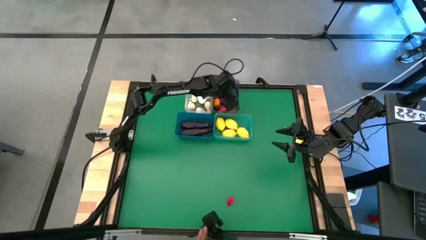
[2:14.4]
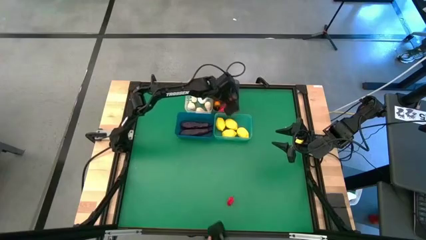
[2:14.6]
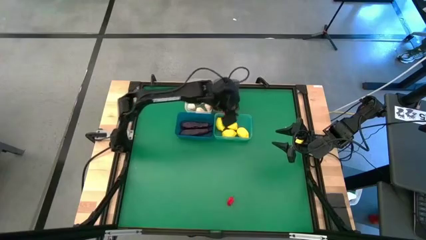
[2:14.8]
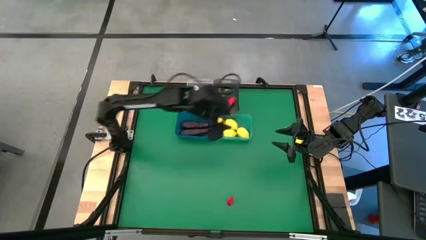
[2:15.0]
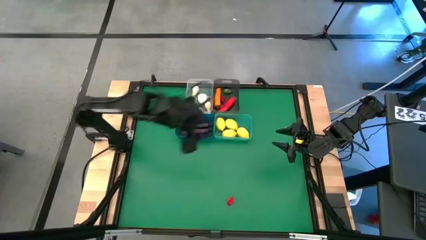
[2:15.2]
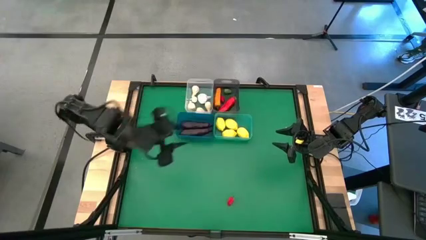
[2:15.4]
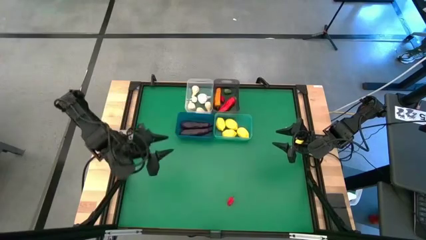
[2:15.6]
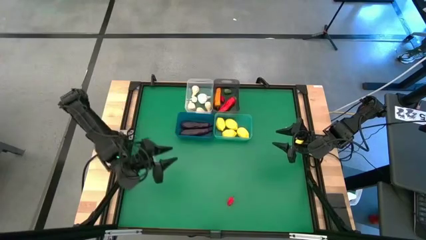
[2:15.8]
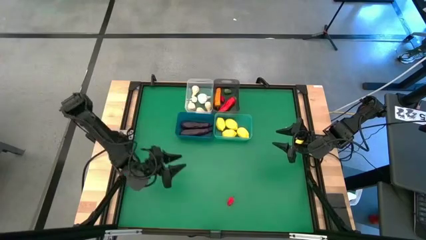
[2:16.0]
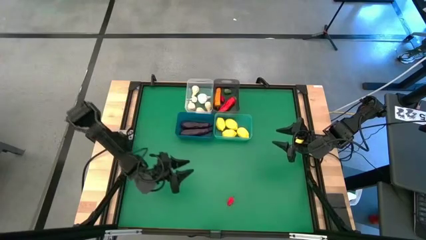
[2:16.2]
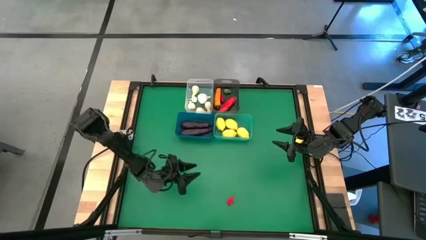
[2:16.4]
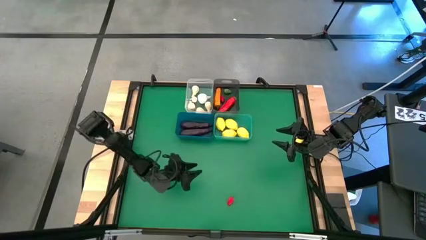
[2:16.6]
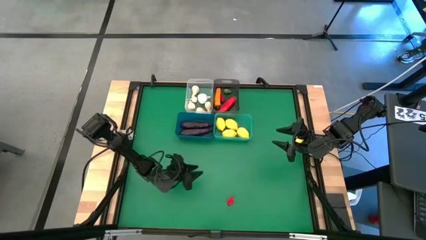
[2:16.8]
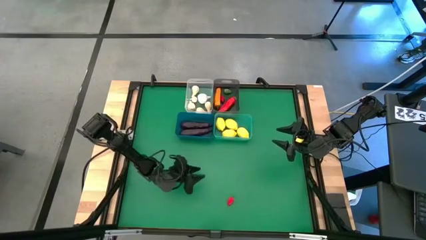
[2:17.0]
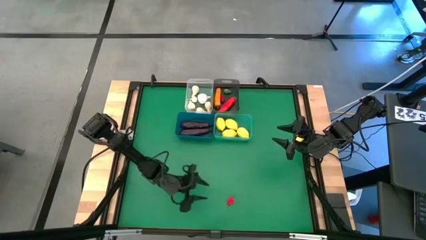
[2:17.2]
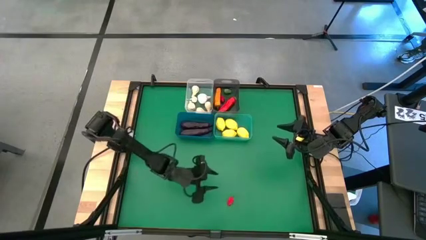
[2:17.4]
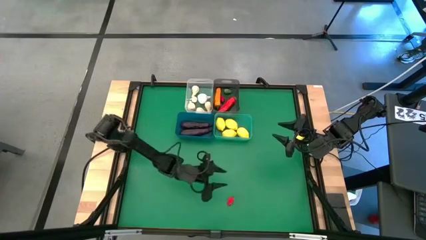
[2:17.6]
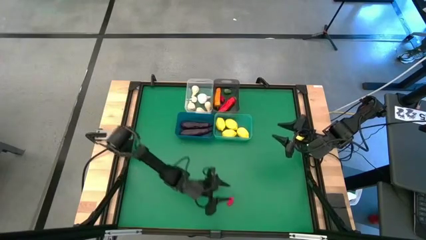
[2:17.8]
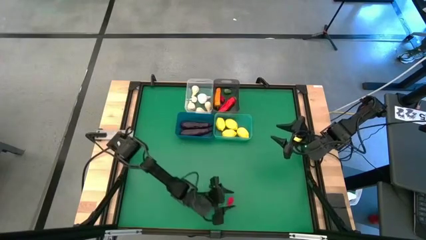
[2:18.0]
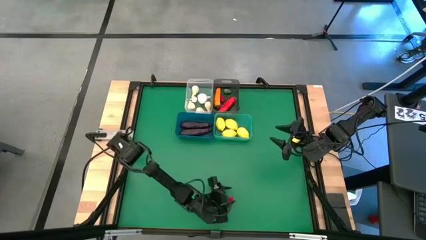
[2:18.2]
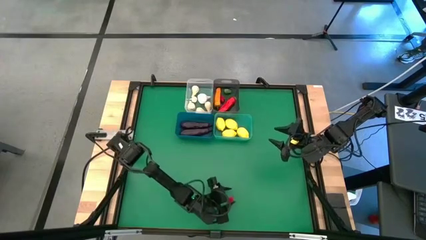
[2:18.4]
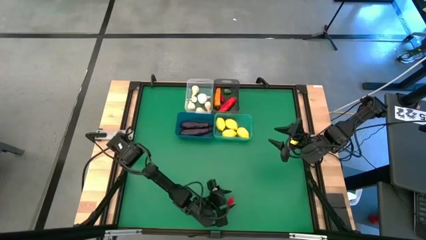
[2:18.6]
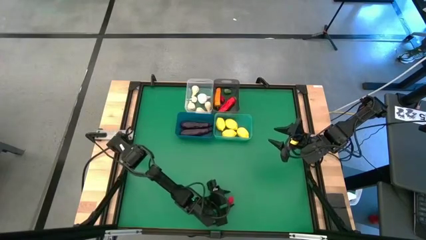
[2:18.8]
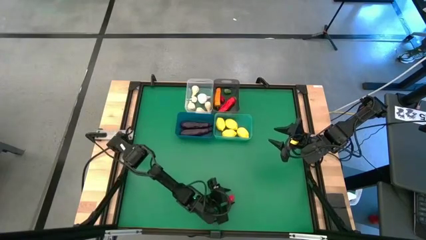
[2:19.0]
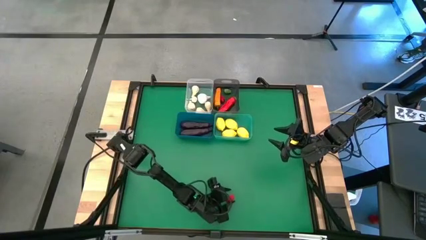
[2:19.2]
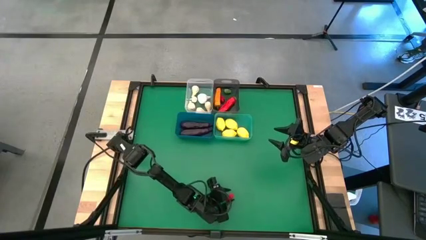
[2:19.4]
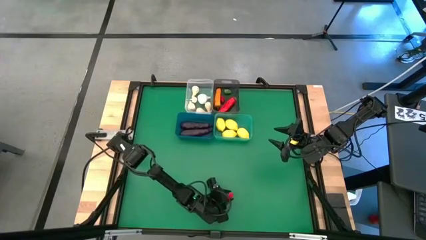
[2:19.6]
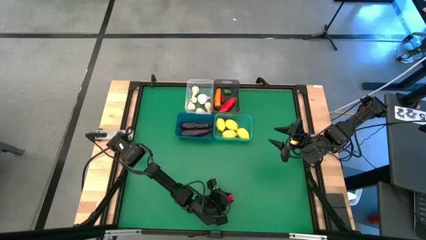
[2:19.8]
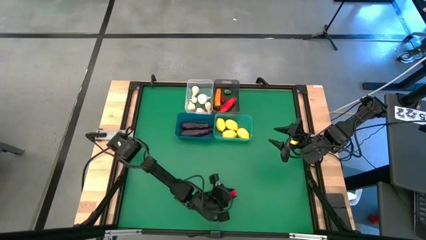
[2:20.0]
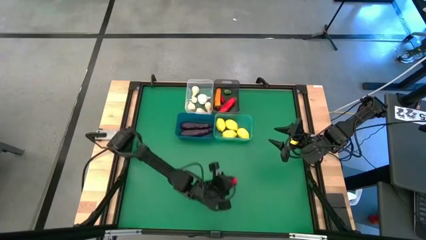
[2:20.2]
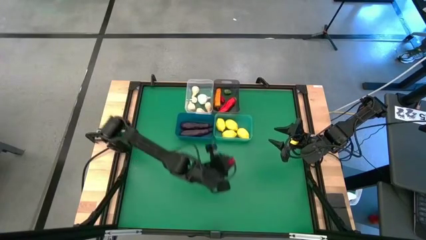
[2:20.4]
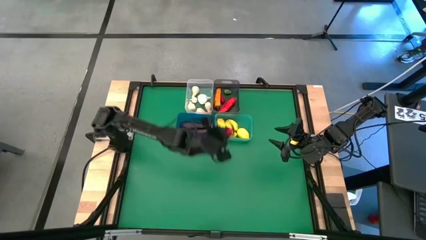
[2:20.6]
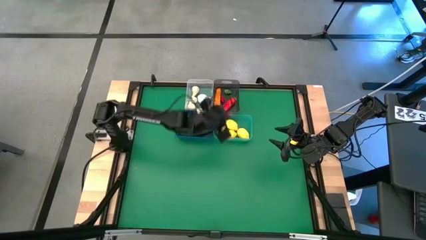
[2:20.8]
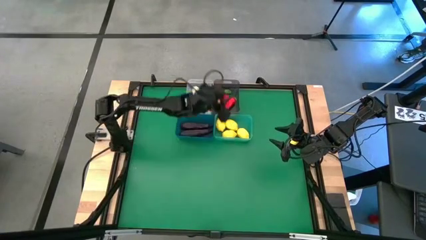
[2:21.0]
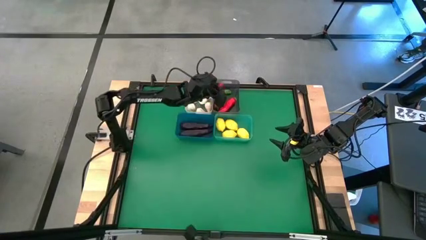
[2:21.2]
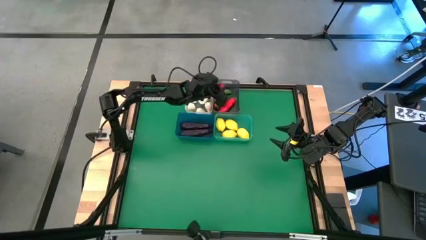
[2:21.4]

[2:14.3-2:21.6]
Task: Sort produce into baskets
Put the red chili pepper into the black bin

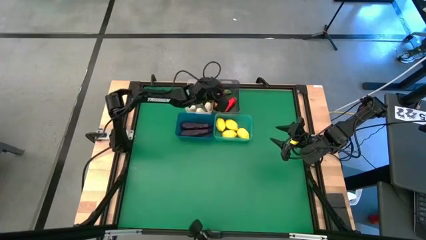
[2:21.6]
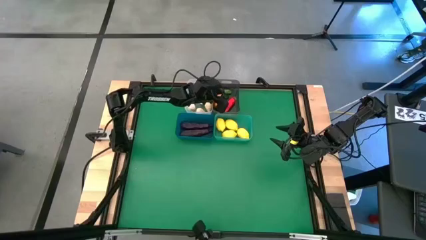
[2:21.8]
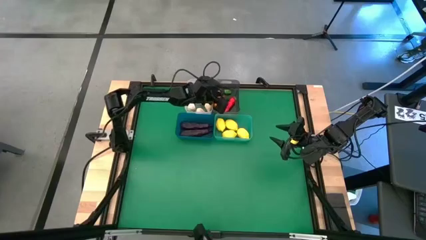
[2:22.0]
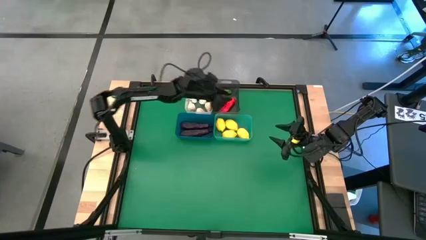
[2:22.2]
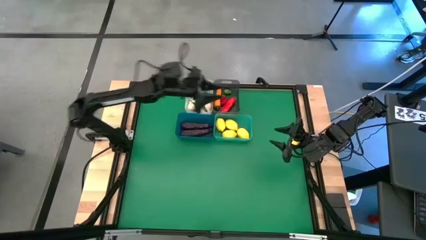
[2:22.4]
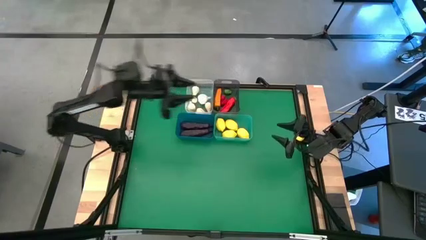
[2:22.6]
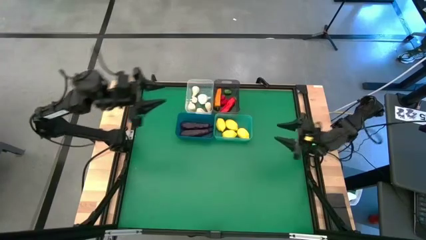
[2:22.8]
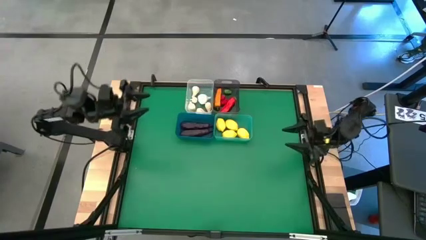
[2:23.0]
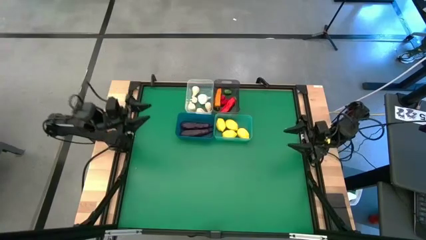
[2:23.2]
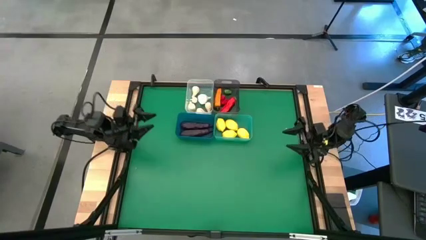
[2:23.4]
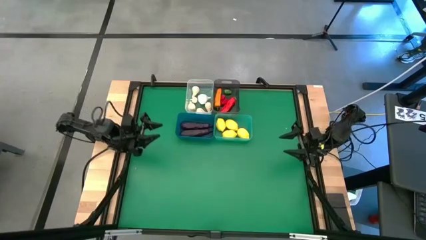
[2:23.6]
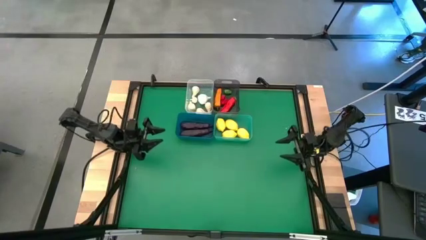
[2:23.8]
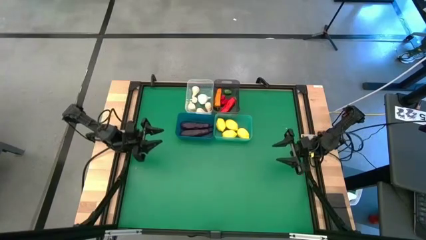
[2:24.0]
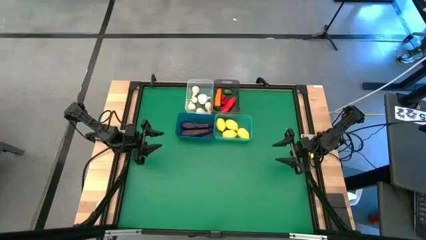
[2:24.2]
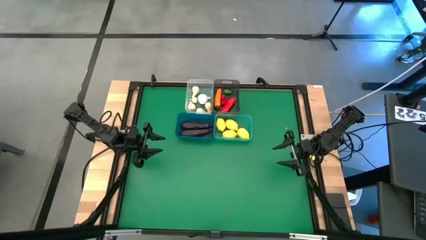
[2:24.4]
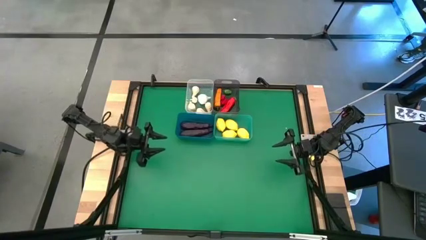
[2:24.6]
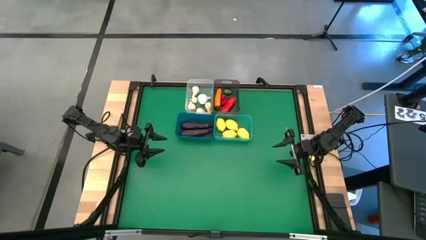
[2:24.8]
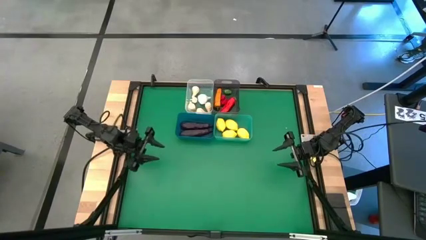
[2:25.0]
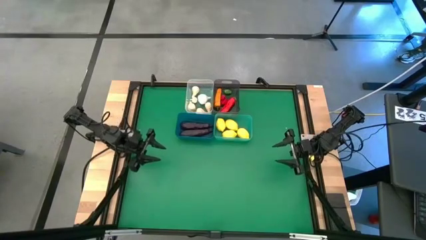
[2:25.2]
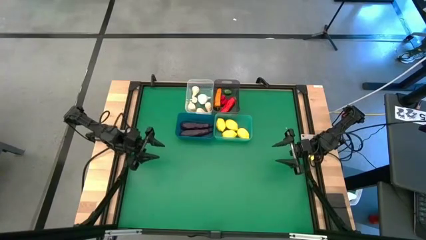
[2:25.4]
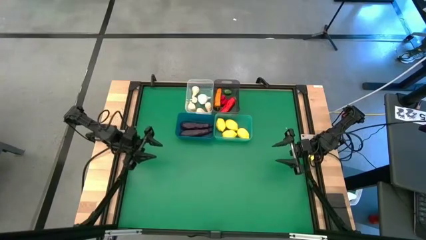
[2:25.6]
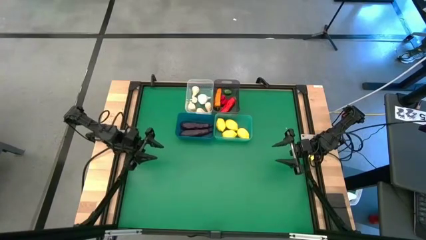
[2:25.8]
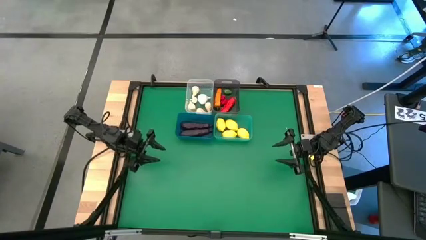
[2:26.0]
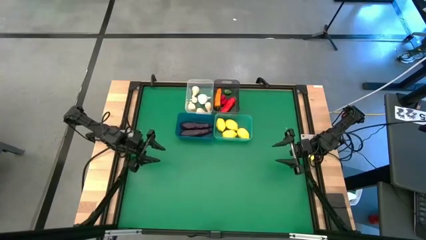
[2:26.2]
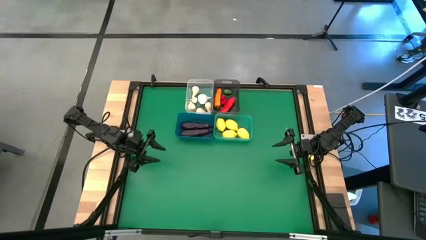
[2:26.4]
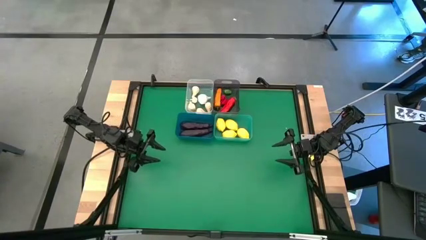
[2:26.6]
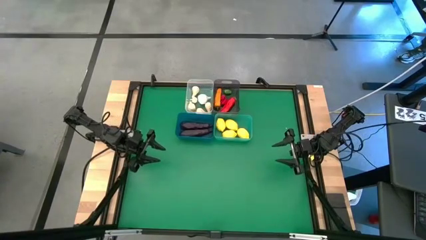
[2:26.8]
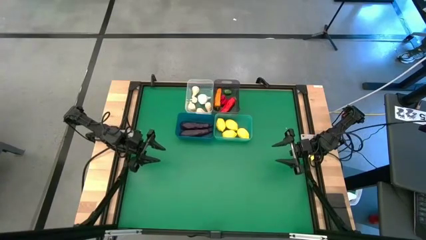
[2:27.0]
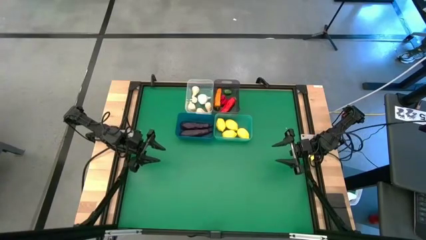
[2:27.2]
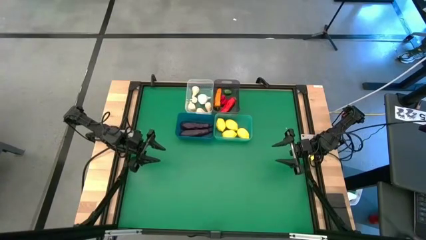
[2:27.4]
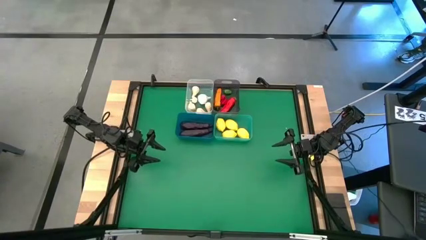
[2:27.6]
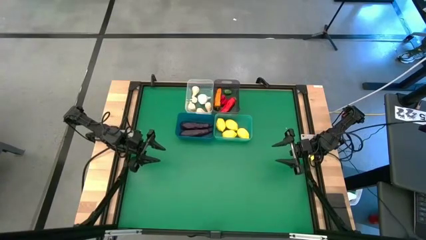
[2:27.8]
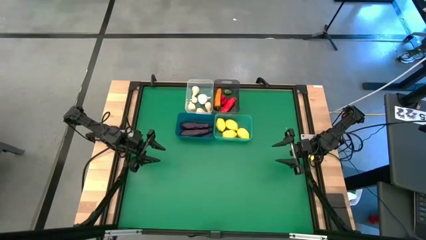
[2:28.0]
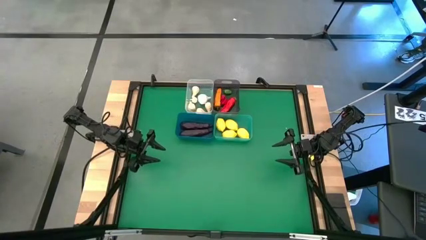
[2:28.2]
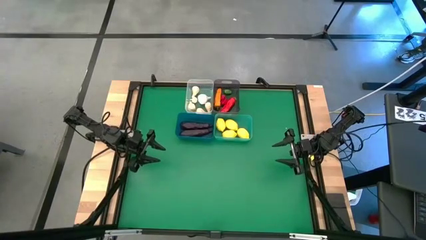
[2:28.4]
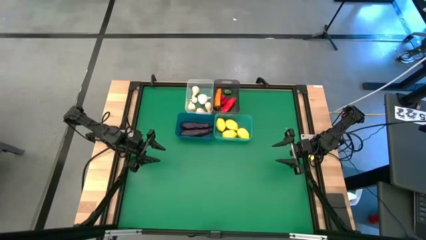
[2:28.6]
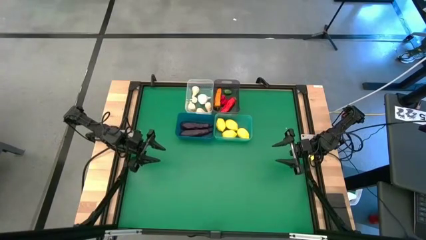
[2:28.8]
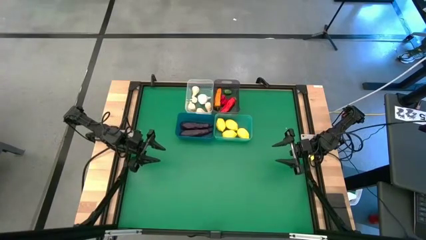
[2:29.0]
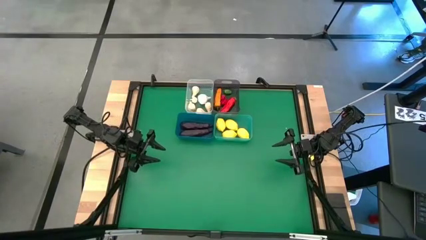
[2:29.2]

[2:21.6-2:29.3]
Return to Home Position

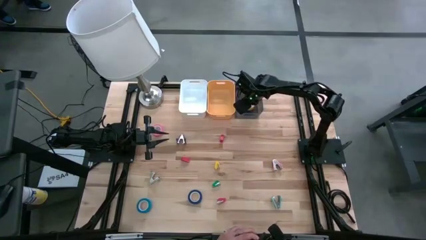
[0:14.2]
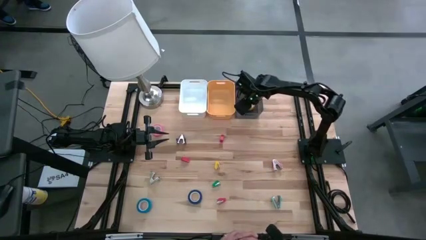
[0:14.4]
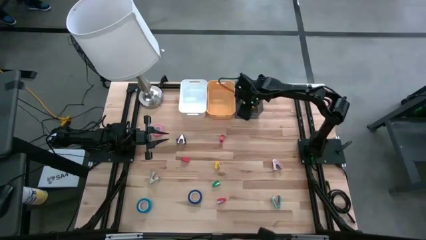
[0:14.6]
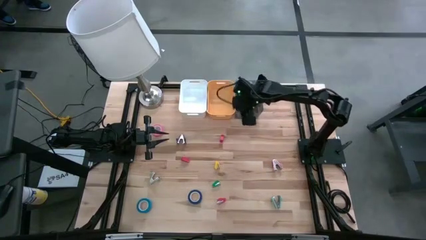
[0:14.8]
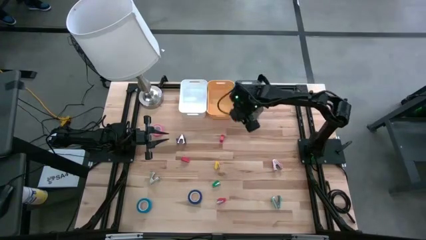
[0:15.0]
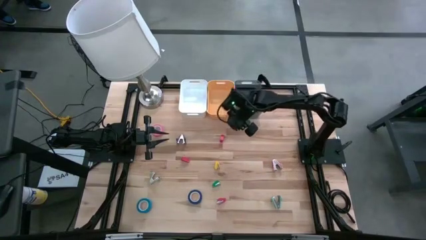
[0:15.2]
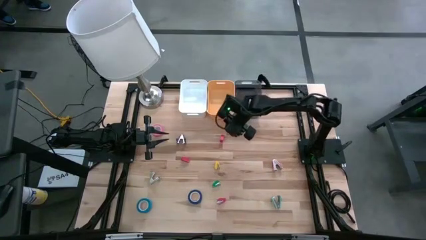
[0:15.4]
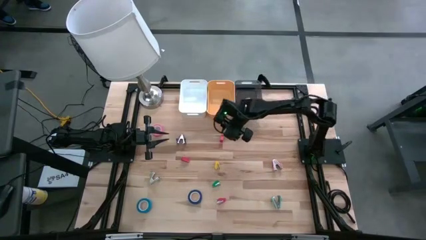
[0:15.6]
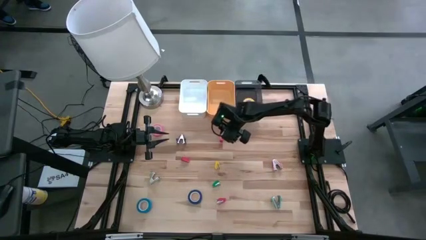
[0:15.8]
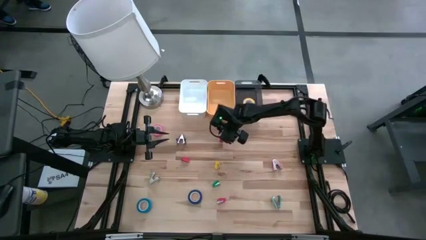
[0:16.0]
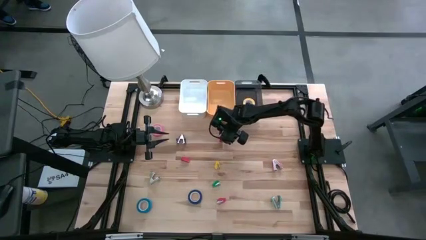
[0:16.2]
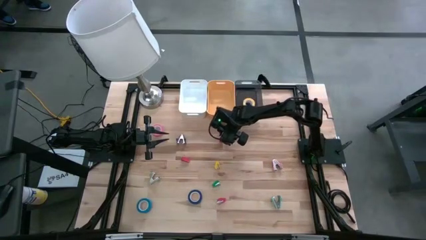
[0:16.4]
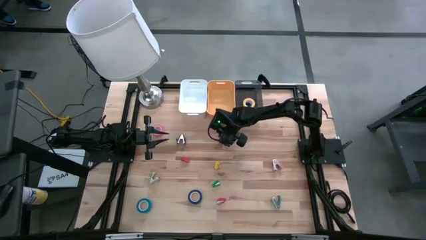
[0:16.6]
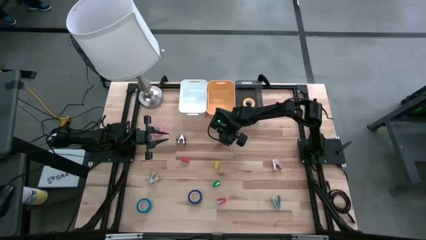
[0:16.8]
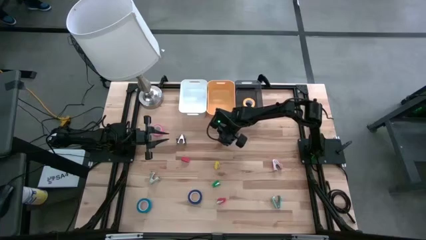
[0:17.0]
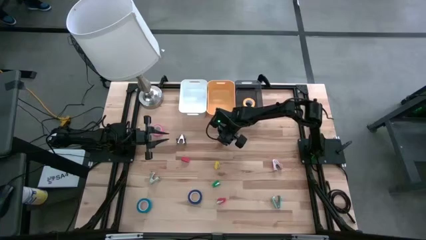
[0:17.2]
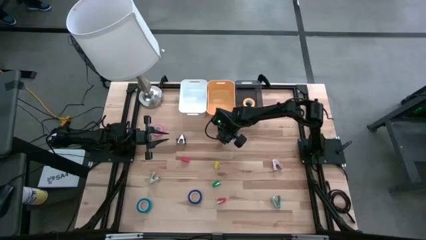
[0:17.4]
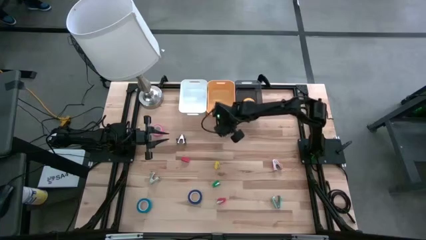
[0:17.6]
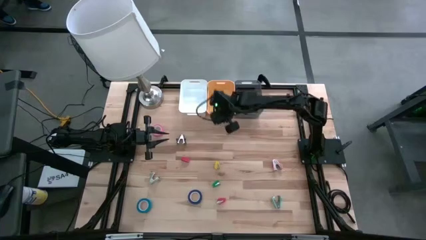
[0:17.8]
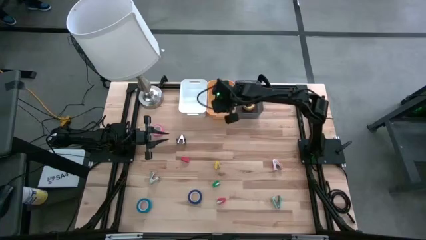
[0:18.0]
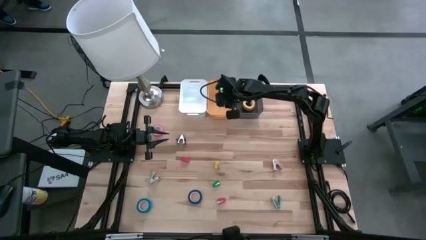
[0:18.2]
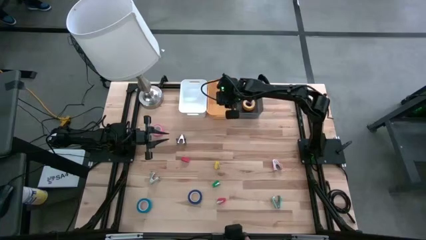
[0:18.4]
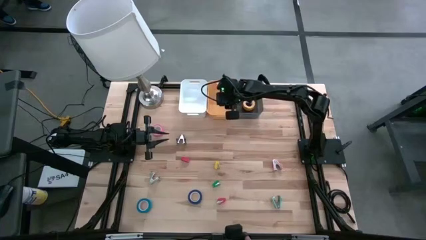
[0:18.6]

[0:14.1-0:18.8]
Task: Pick and place Stapler, Stapler remover, tape
Put the top red stapler into the yellow bin
